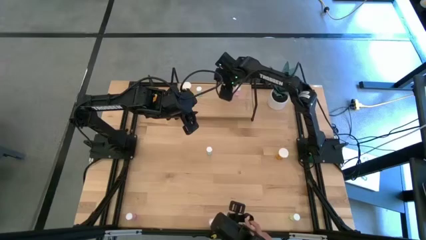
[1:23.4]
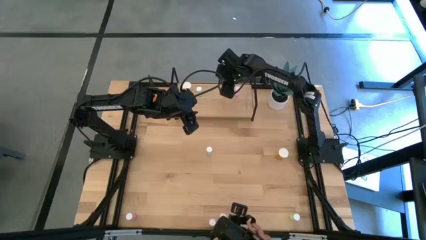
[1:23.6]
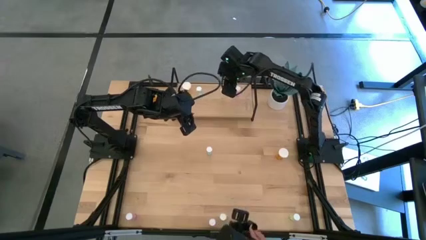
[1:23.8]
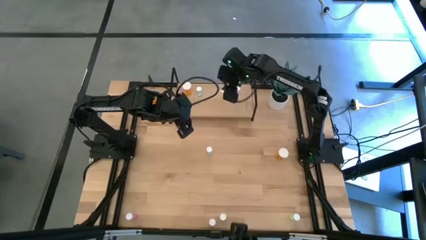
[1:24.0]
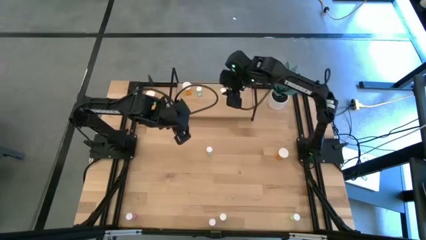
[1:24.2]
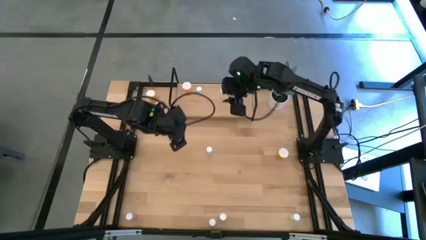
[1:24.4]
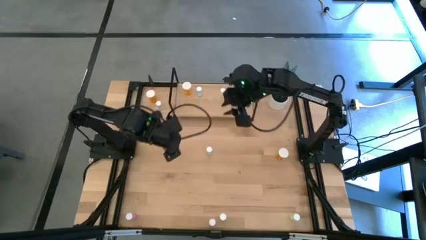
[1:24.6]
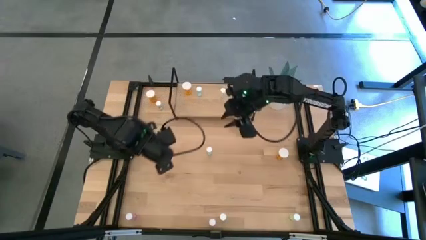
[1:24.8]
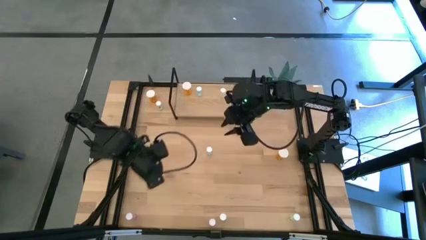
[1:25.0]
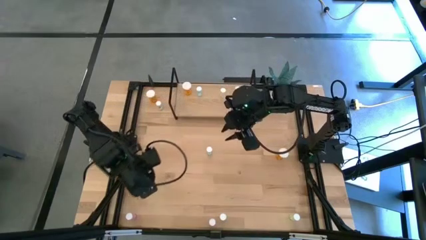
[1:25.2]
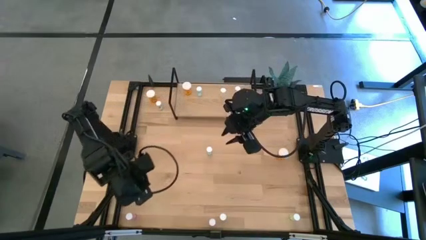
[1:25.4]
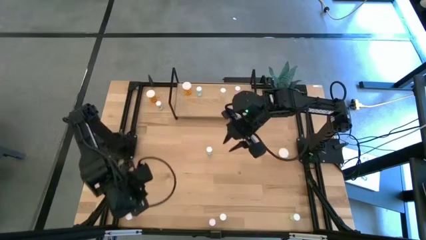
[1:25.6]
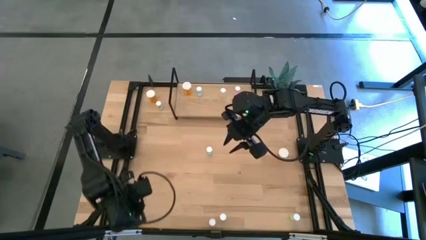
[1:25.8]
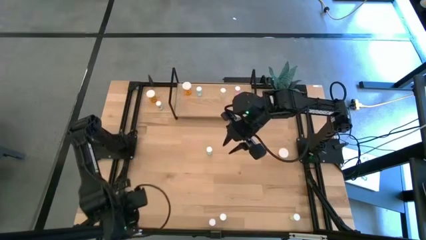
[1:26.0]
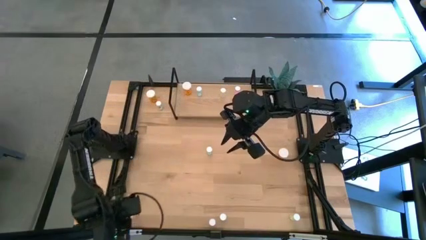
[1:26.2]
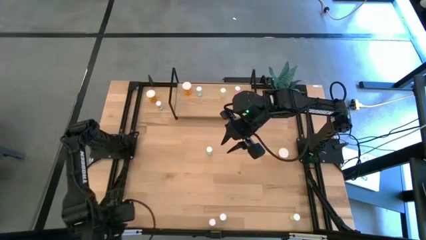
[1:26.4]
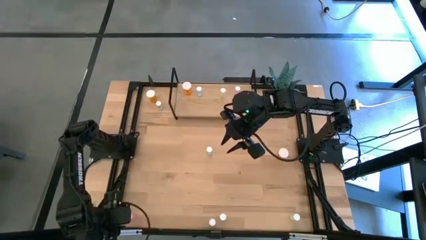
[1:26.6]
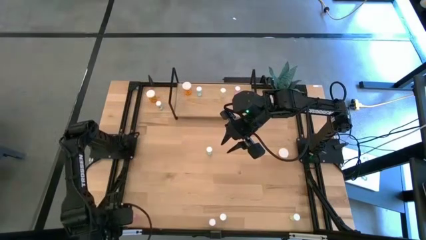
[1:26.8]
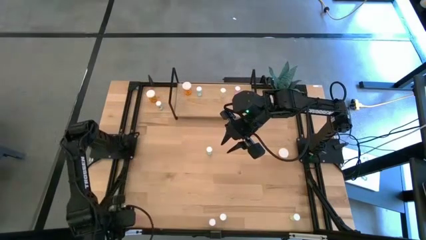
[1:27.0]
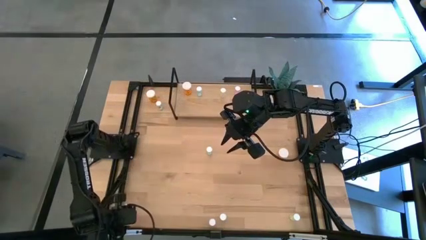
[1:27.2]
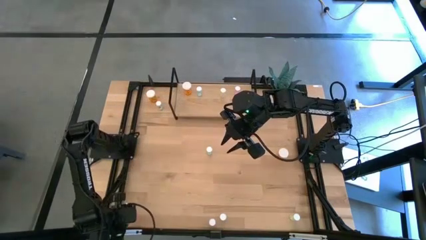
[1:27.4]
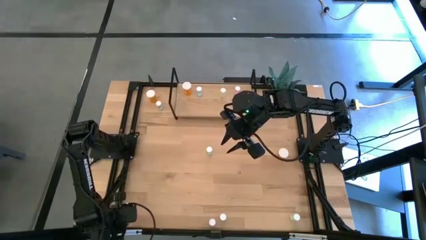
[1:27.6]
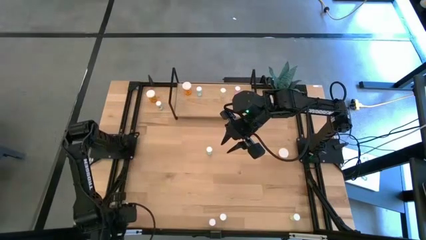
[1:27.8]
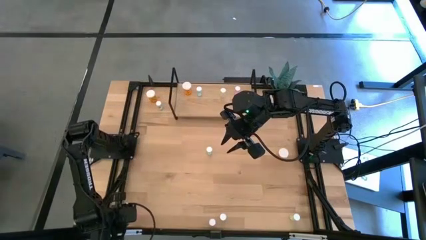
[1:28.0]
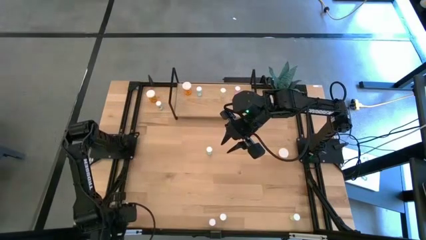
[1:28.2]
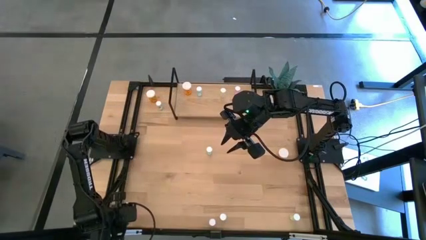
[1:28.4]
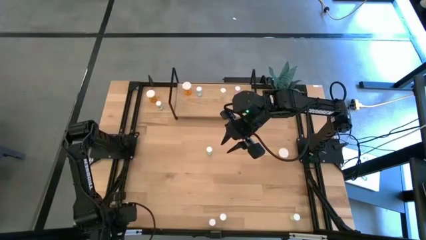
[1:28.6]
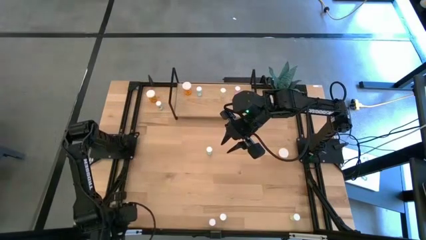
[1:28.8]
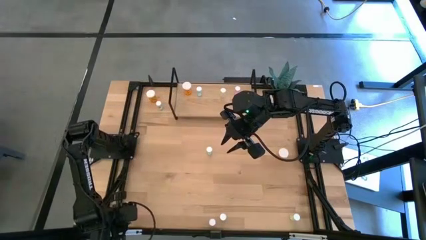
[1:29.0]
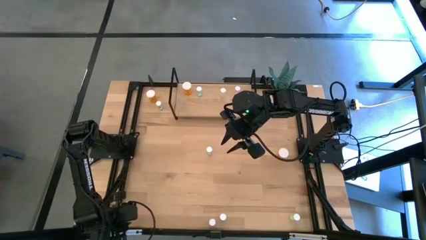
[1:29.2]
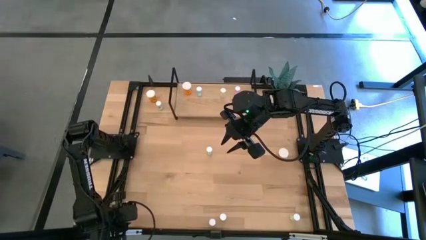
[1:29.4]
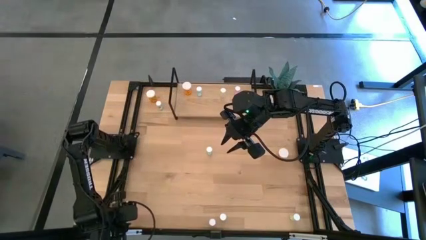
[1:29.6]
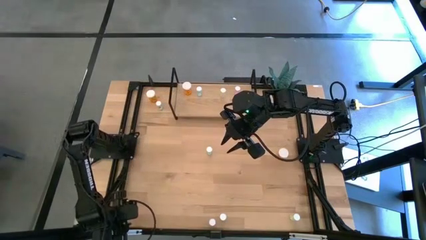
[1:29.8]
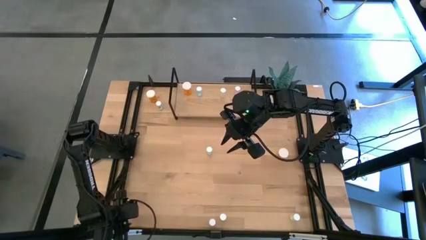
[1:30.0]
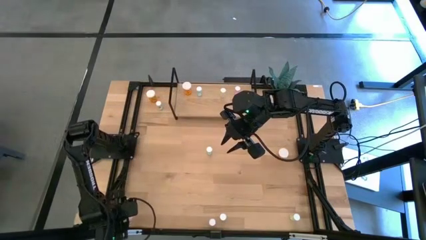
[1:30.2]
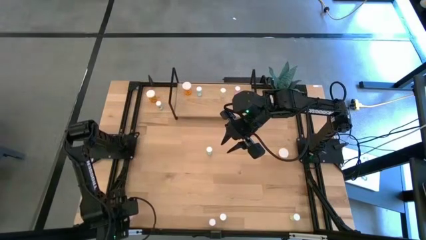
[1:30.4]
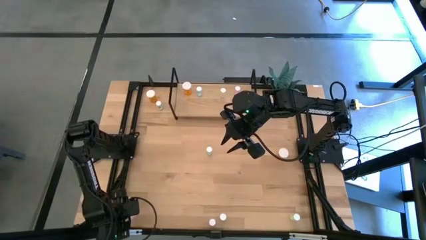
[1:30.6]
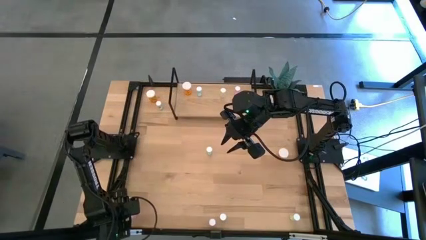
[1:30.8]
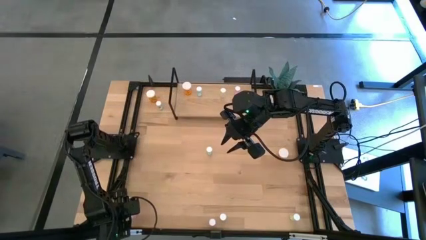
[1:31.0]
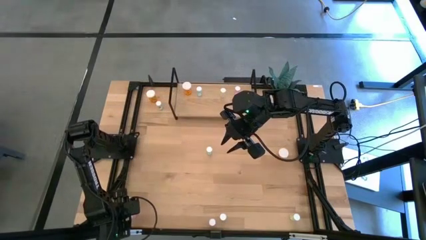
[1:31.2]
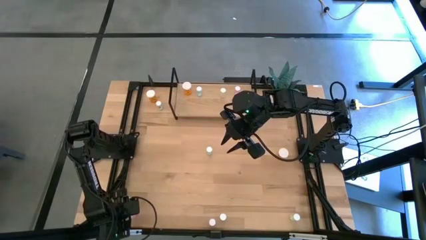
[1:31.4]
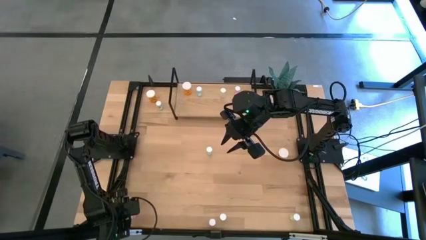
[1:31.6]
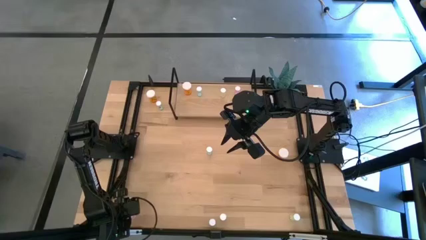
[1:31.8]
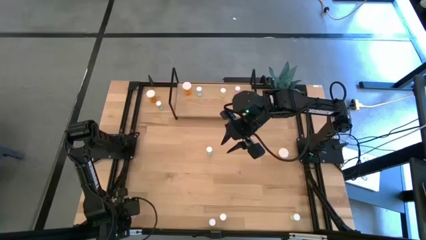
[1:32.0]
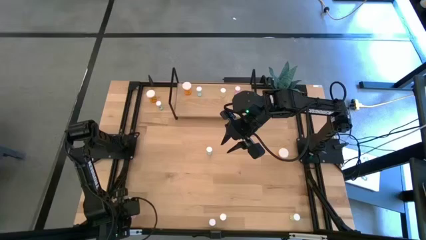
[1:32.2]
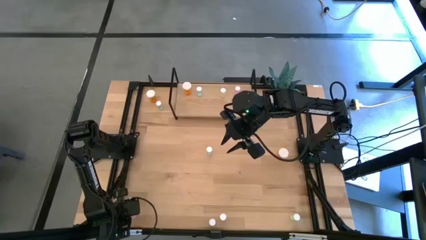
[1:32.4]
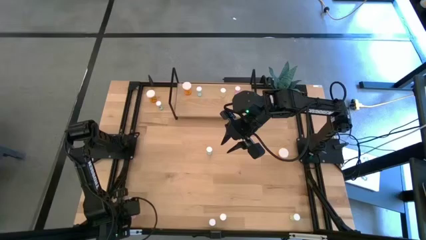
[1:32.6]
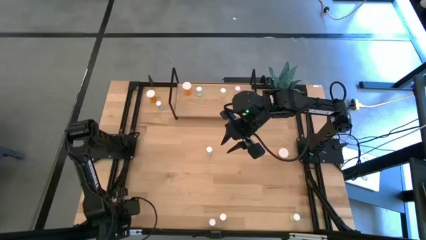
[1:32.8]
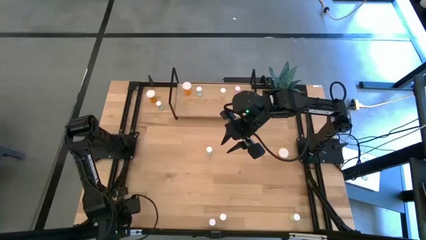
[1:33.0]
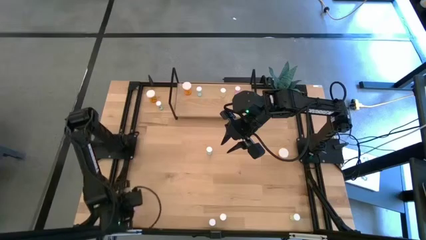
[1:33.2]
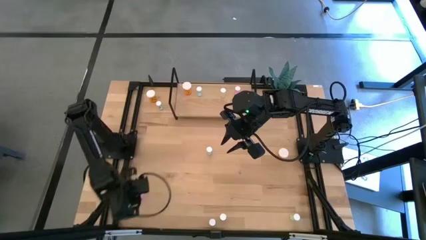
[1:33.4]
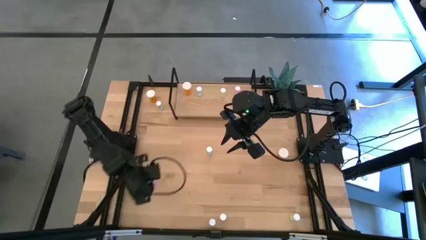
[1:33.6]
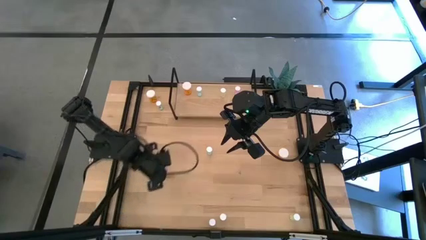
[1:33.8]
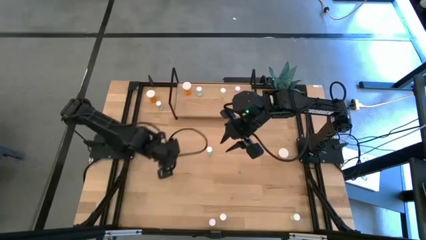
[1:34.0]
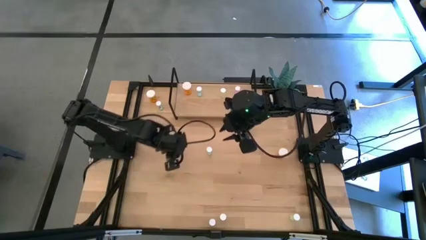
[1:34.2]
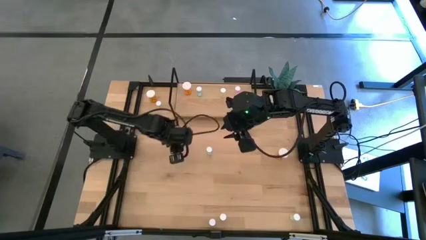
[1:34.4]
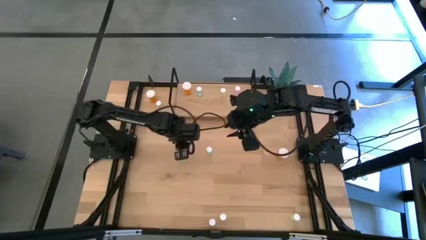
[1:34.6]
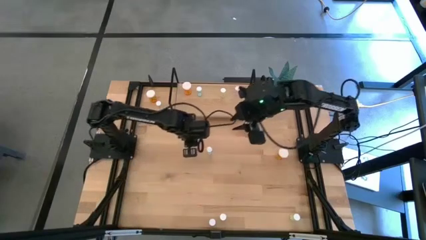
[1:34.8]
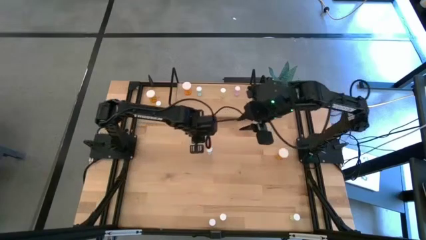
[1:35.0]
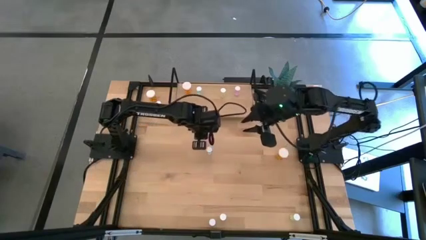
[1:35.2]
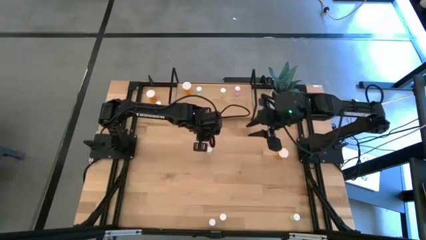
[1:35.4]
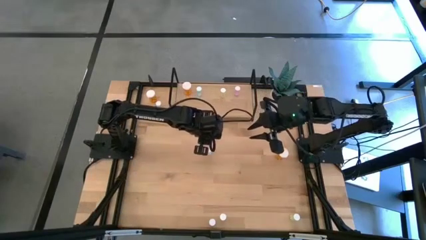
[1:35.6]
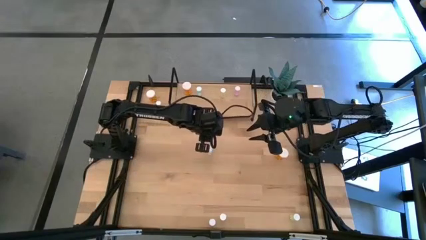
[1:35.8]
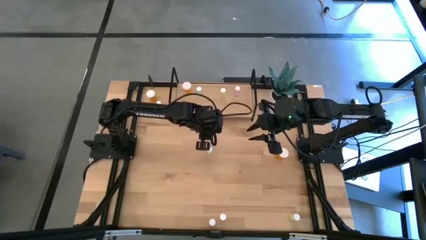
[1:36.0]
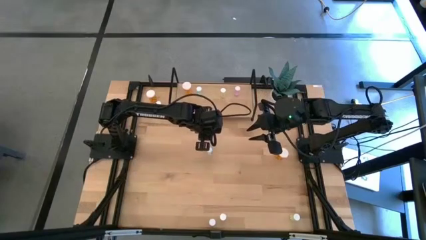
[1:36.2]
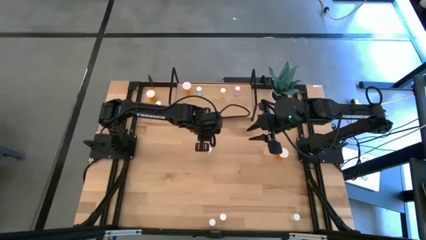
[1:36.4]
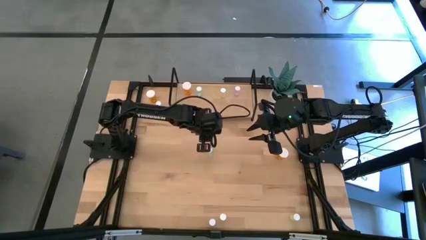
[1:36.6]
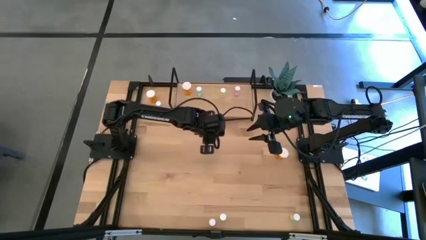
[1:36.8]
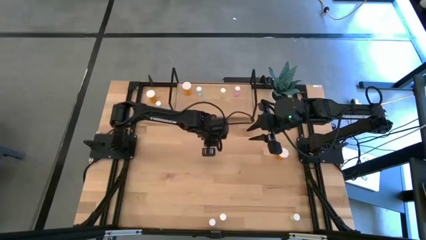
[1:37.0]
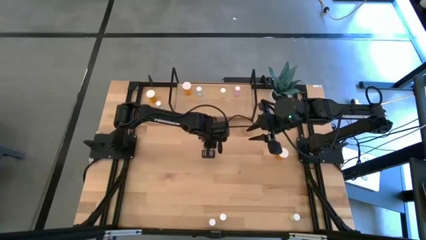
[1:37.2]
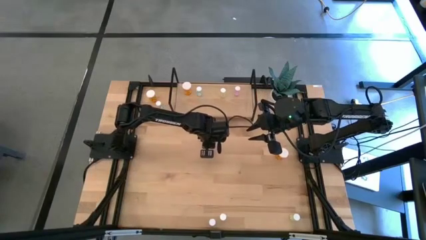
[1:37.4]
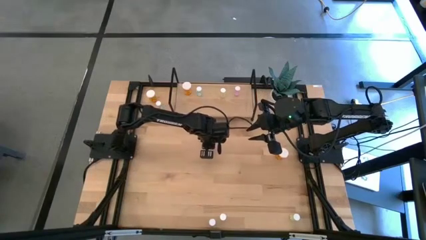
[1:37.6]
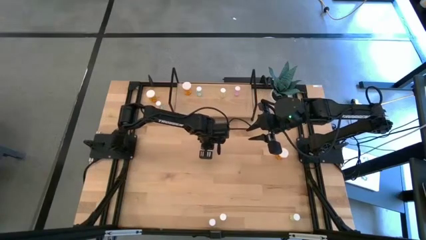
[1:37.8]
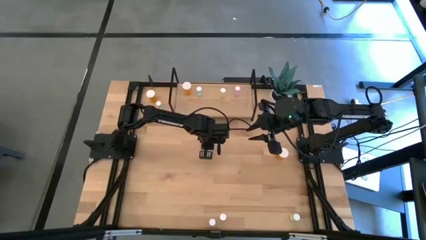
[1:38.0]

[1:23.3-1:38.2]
Task: Pick and place medicine bottles onto shelf by color
Put the left pink pill bottle on the shelf aligned with the other pink pill bottle
